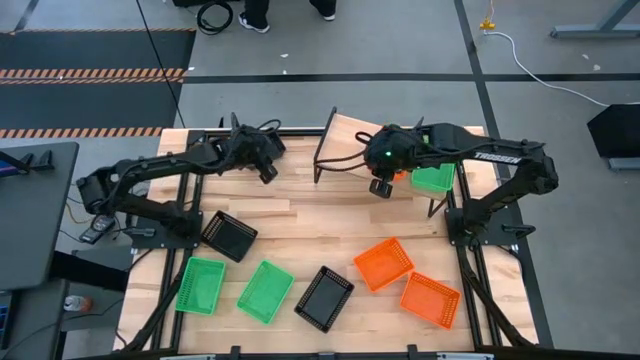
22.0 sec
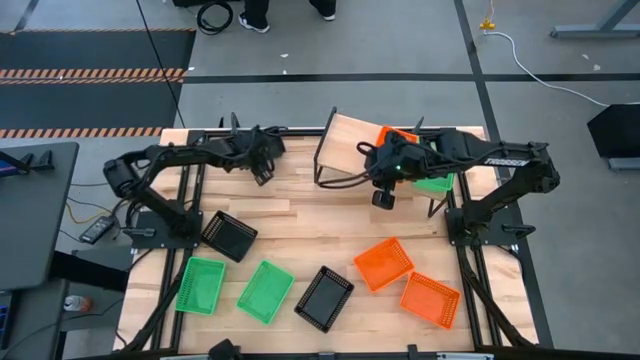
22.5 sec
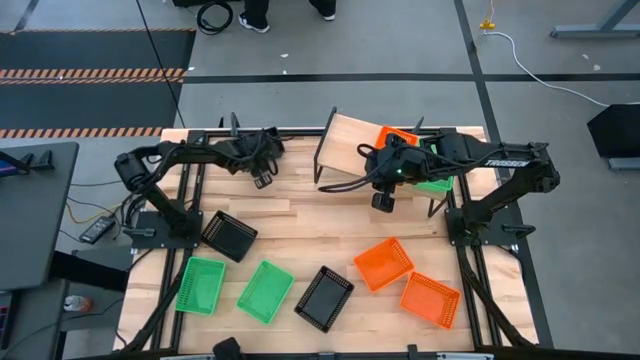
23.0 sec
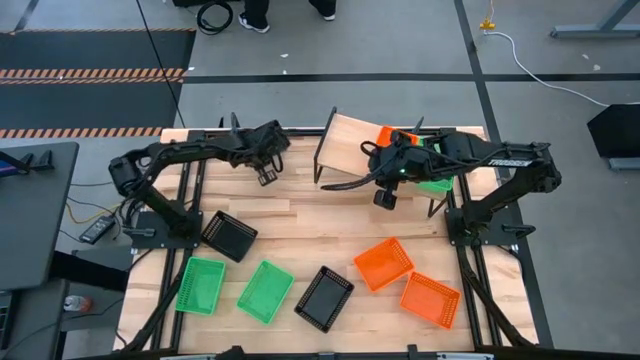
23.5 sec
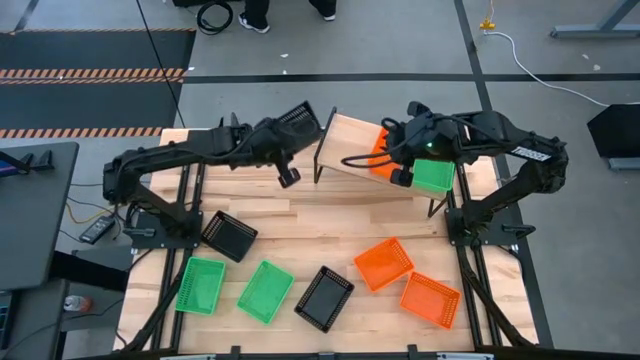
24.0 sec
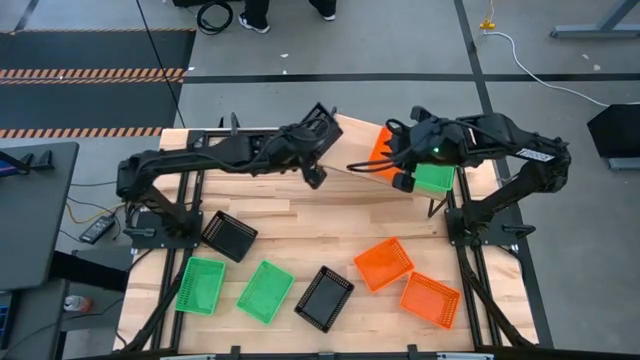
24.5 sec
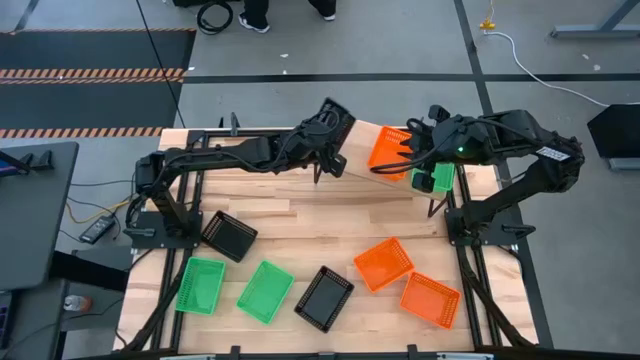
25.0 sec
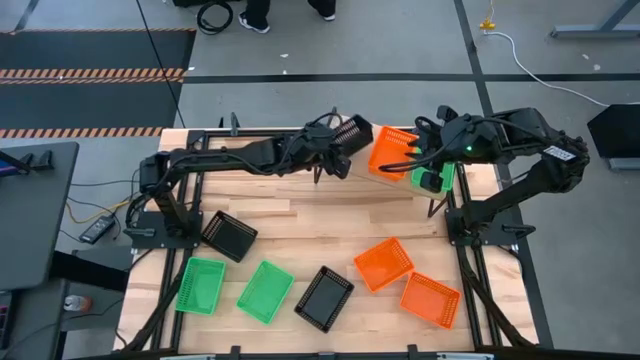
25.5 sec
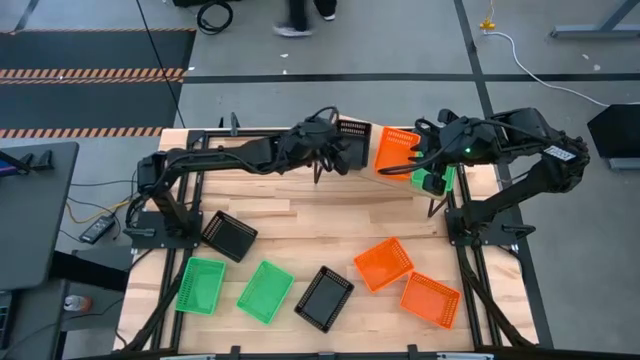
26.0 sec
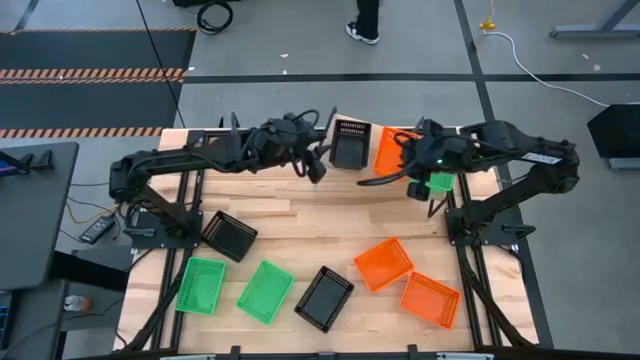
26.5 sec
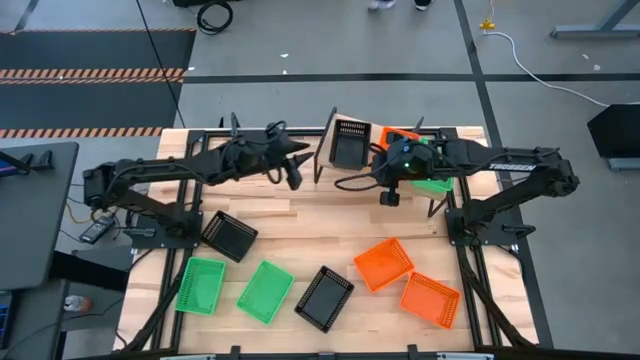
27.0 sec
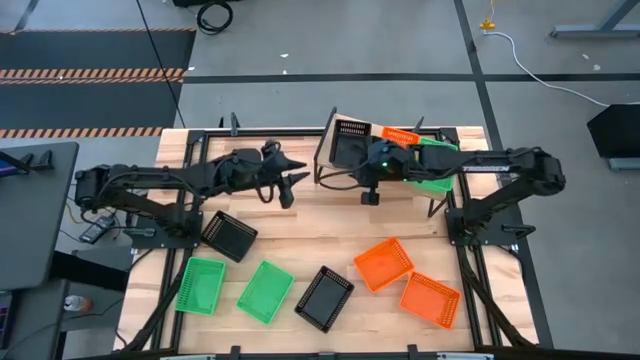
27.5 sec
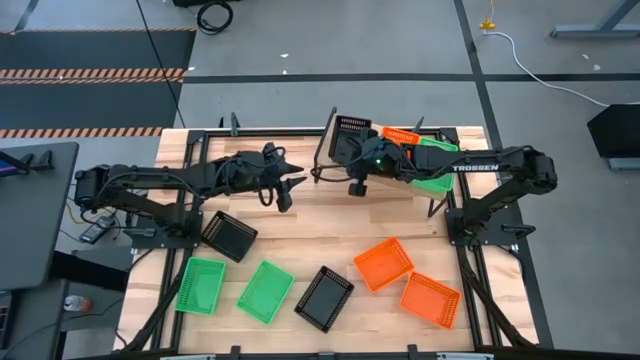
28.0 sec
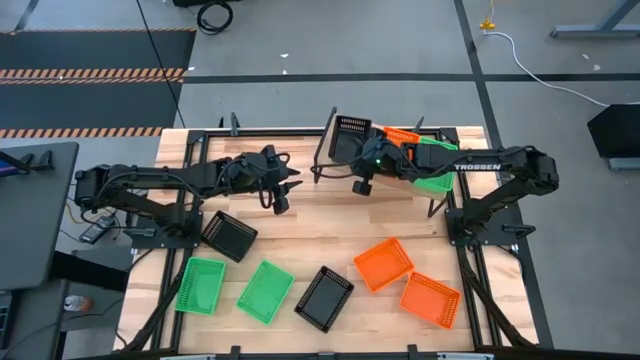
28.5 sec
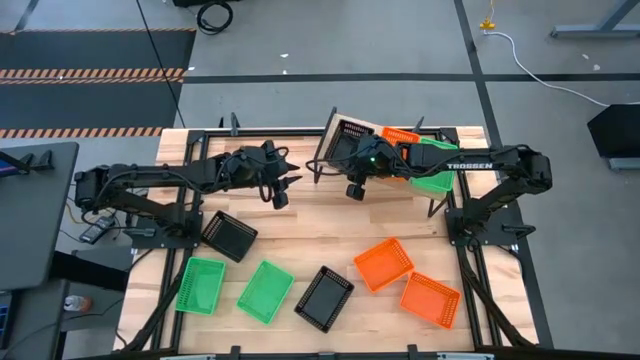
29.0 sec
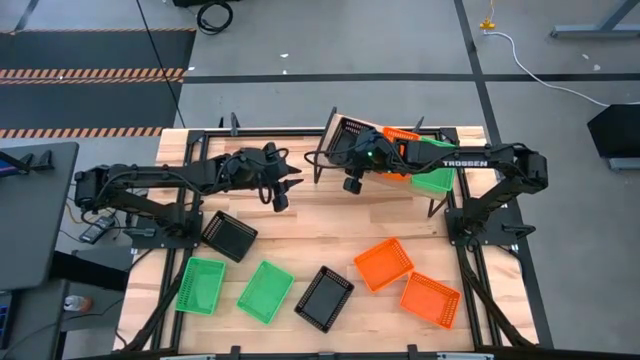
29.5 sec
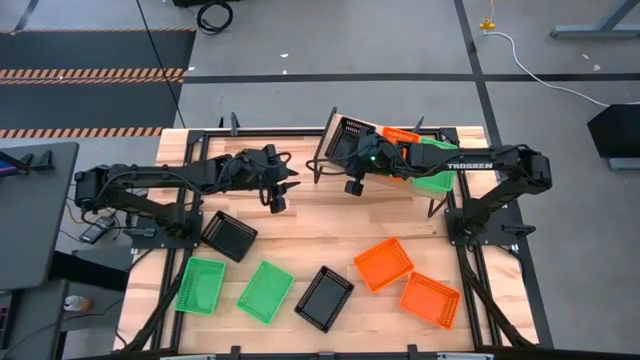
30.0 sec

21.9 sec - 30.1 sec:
Task: Stack baskets on shelf by color
Put the top black bin on the shelf

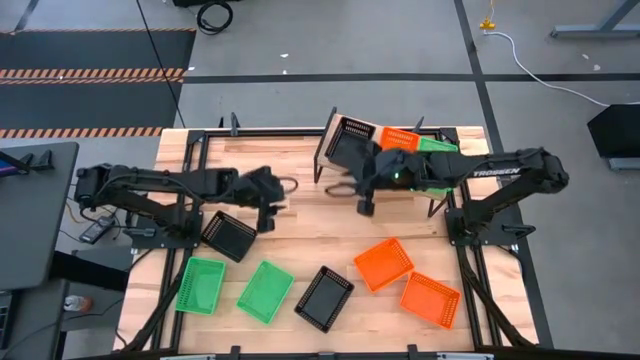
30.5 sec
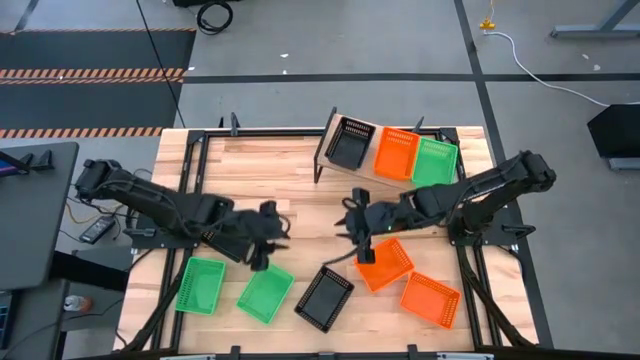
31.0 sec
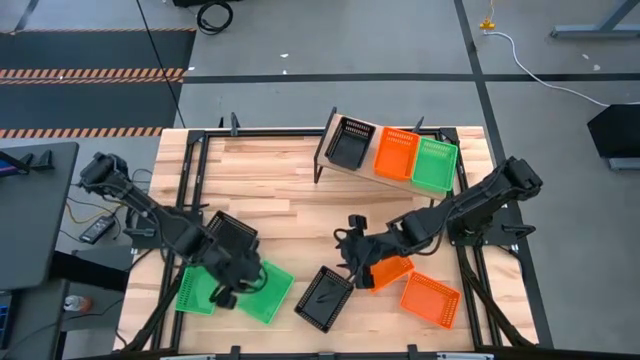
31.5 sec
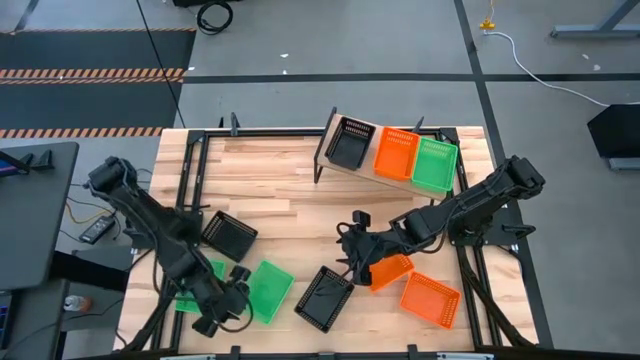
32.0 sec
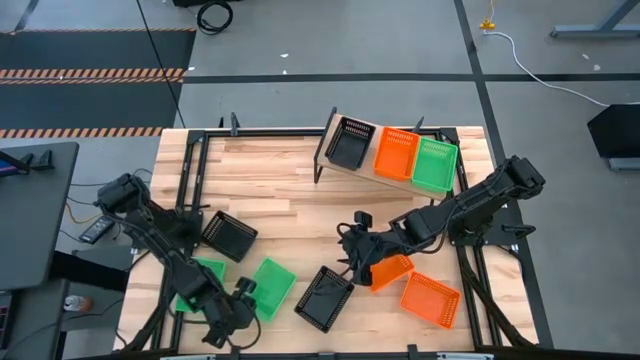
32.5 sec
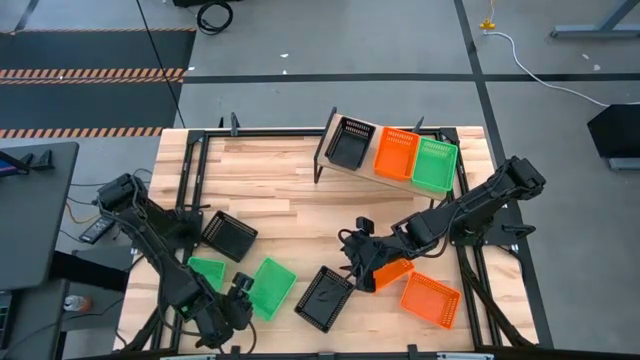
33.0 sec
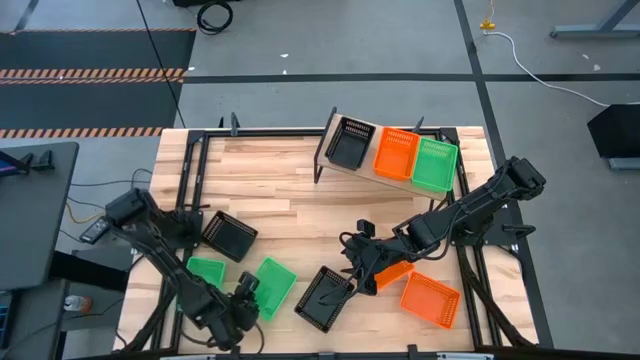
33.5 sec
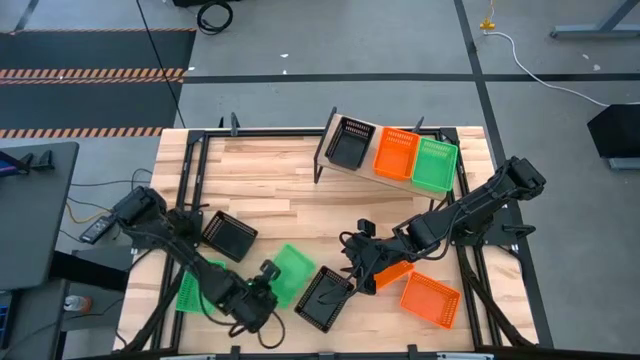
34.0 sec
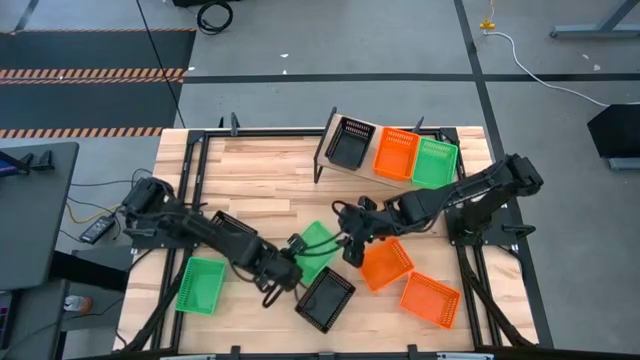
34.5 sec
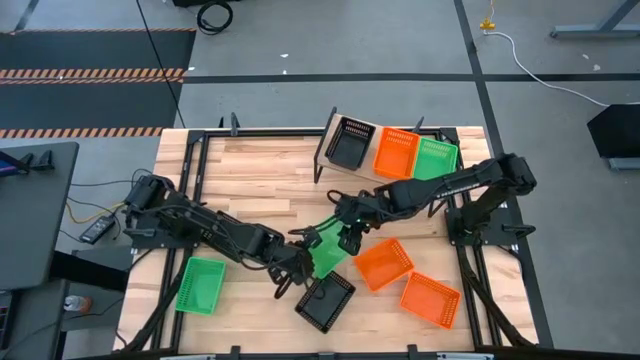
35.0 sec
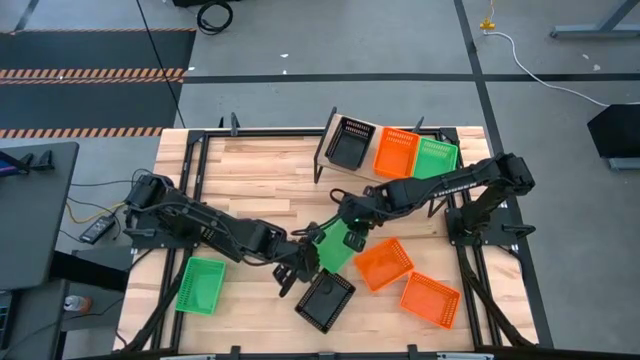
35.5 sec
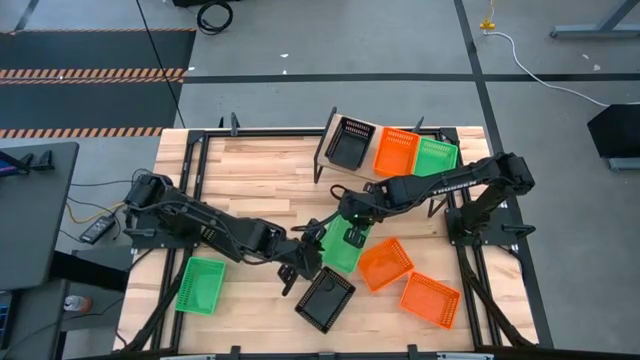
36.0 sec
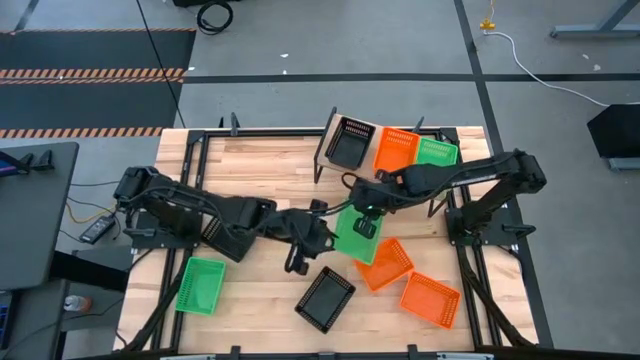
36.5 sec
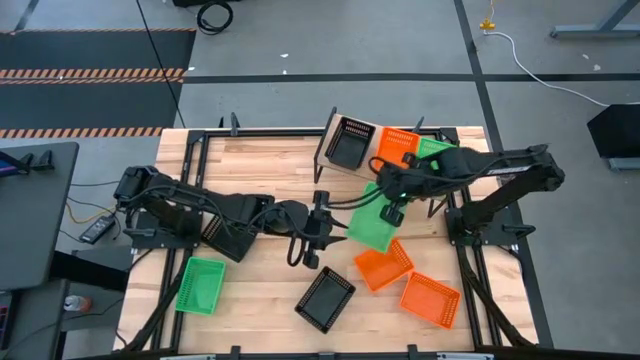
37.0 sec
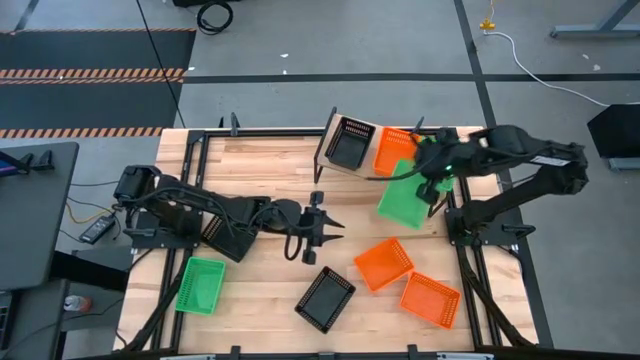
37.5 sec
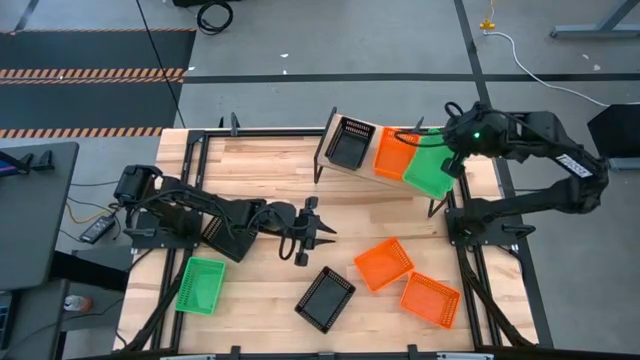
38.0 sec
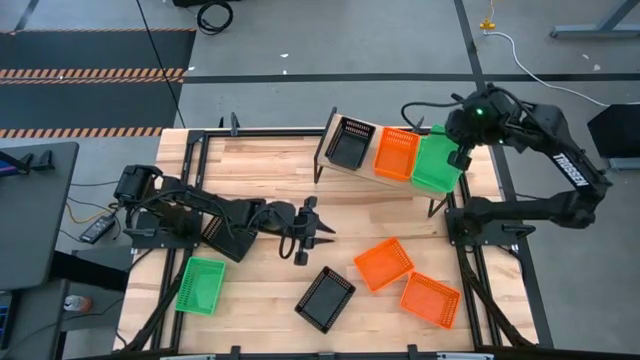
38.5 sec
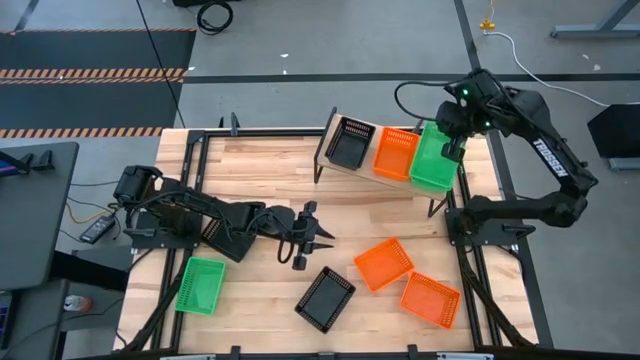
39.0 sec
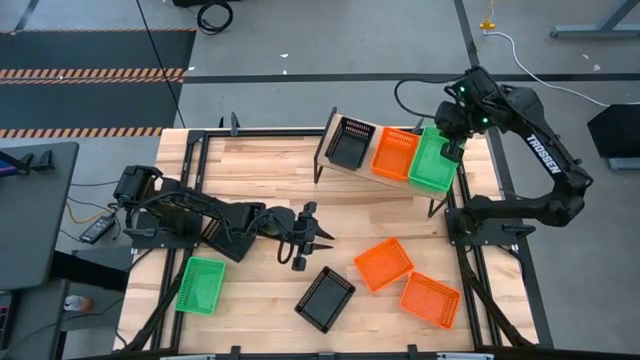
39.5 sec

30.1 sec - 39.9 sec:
Stack the right green bin on top of the green bin on the shelf

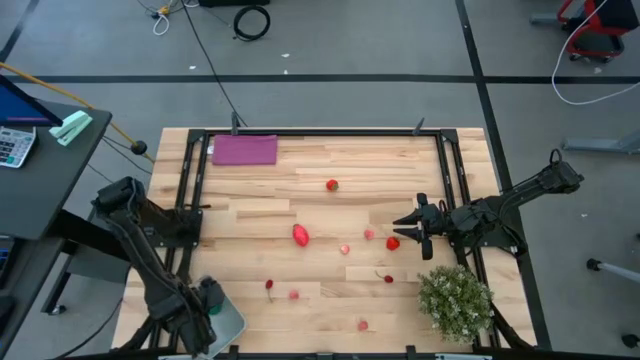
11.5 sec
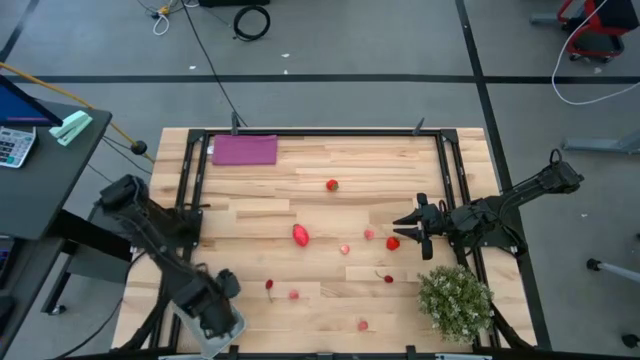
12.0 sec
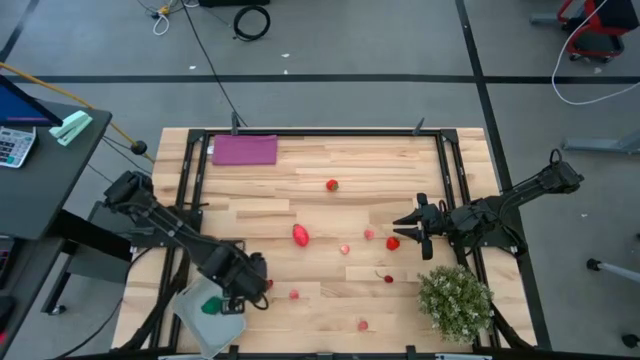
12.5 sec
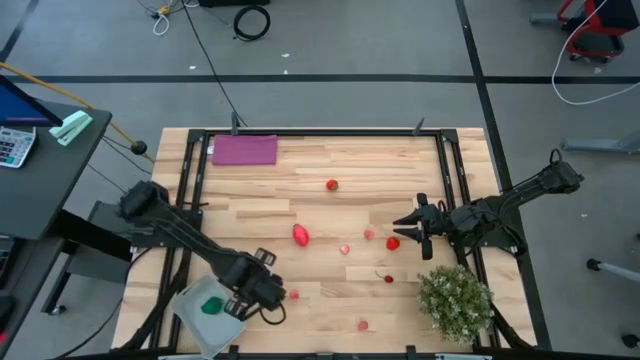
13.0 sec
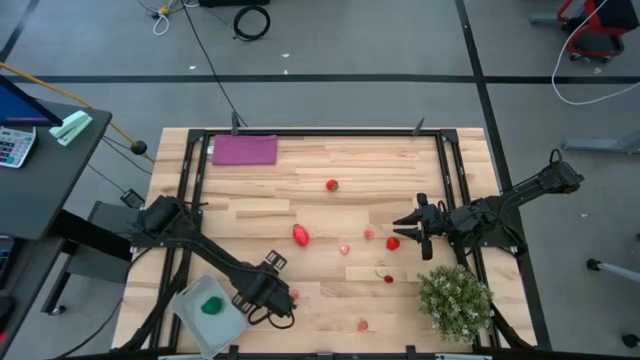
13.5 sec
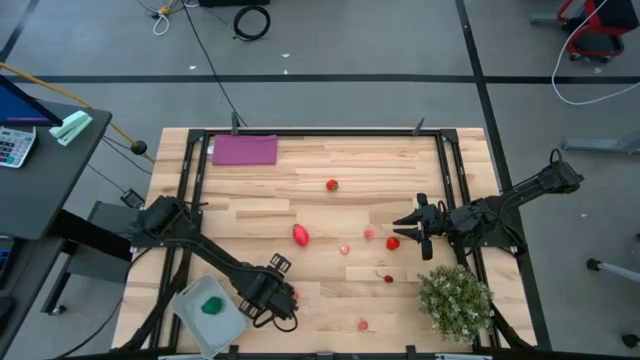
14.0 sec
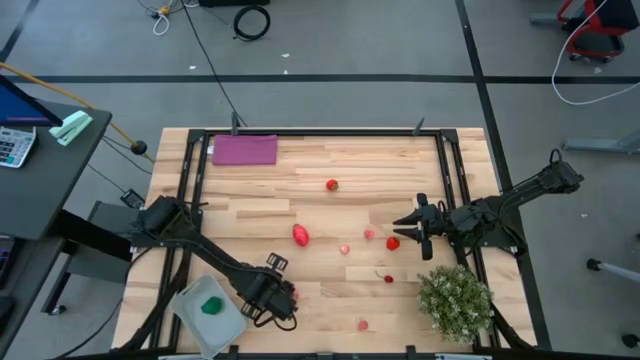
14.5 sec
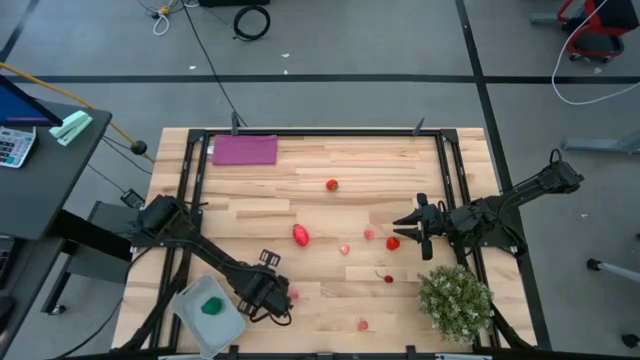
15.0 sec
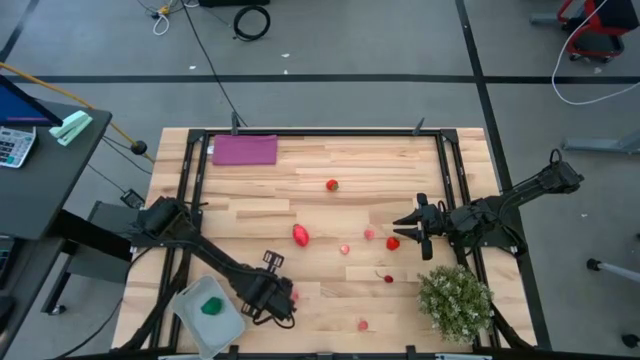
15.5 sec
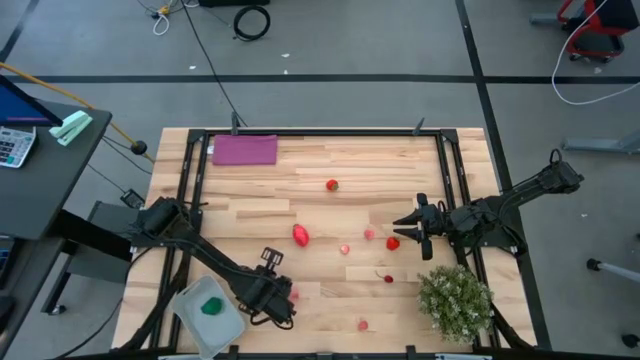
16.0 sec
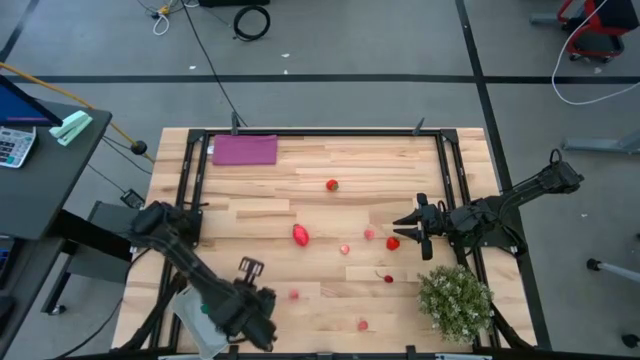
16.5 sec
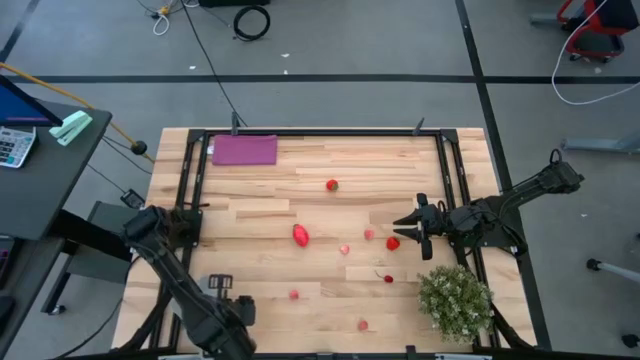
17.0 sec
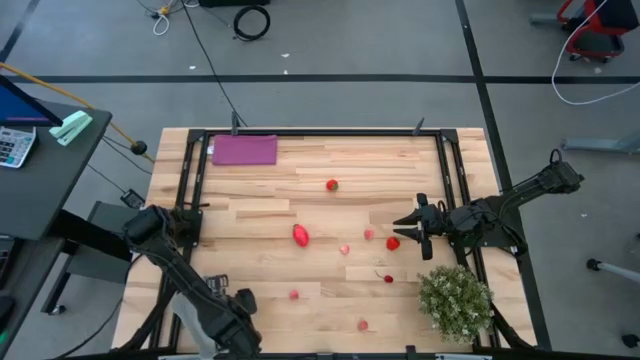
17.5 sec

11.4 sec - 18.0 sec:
Task: Pick and placing Produce into tupperware
Put the red cherry into the gray container
